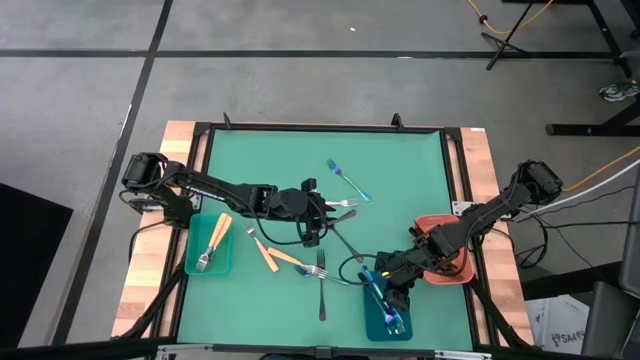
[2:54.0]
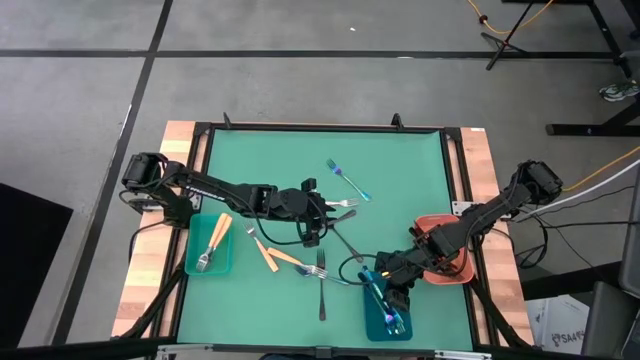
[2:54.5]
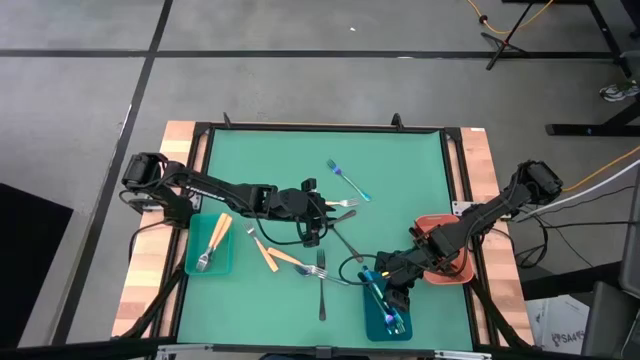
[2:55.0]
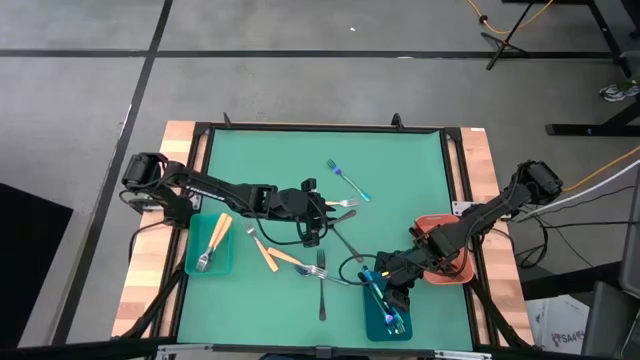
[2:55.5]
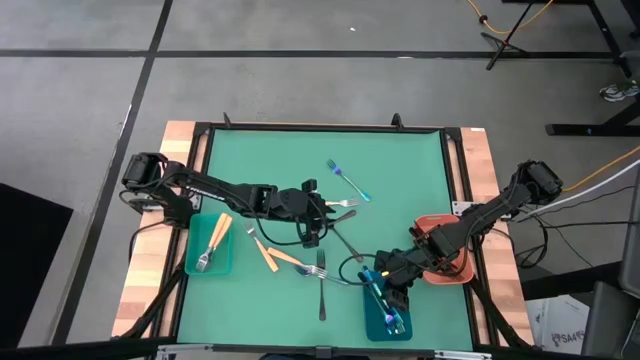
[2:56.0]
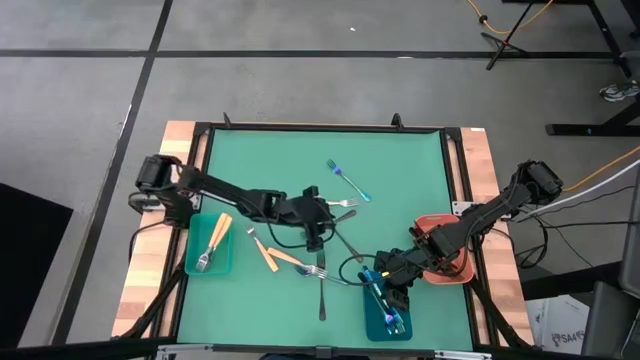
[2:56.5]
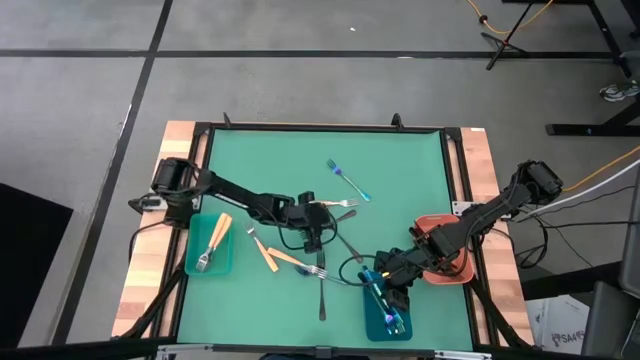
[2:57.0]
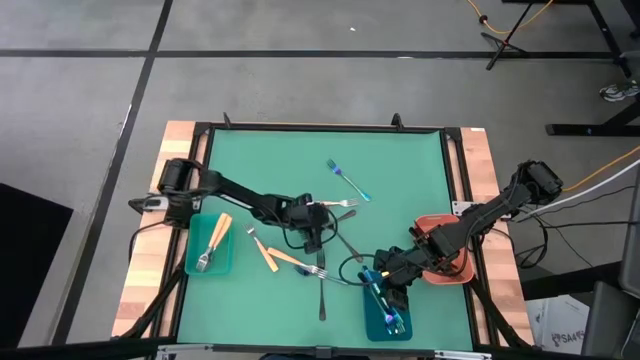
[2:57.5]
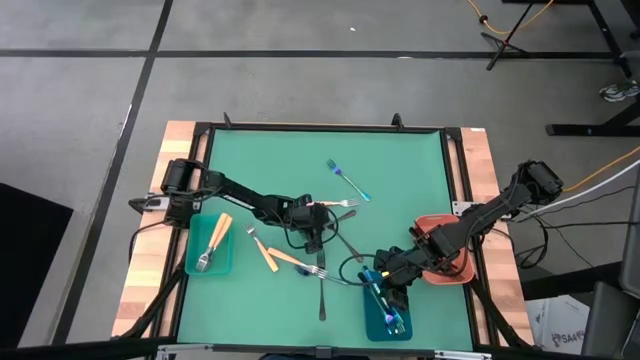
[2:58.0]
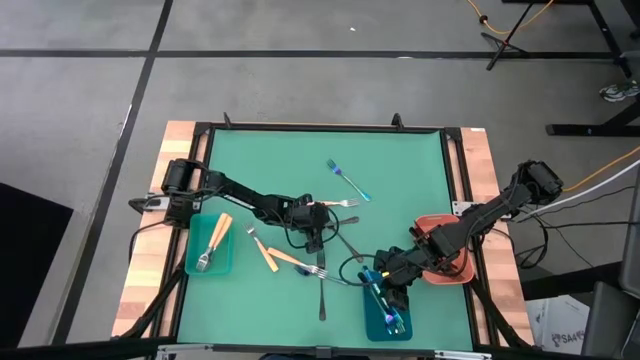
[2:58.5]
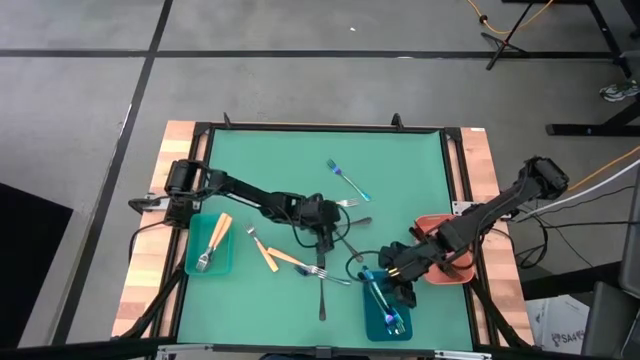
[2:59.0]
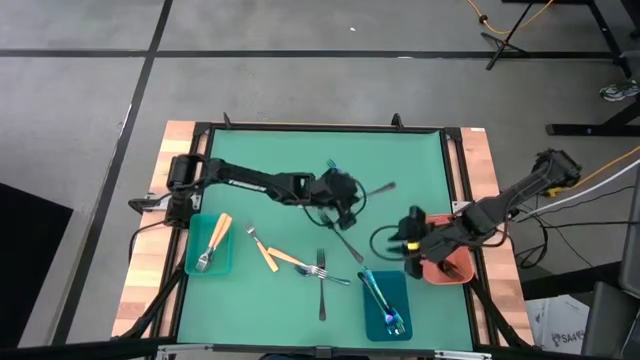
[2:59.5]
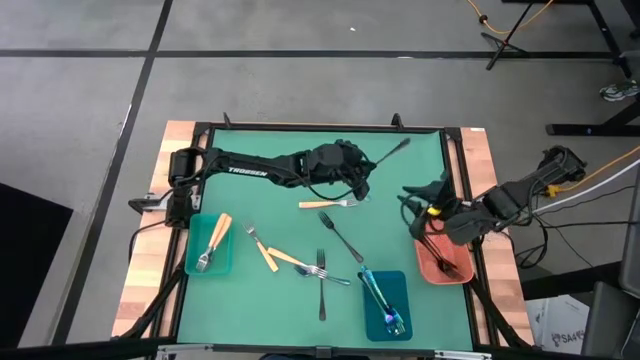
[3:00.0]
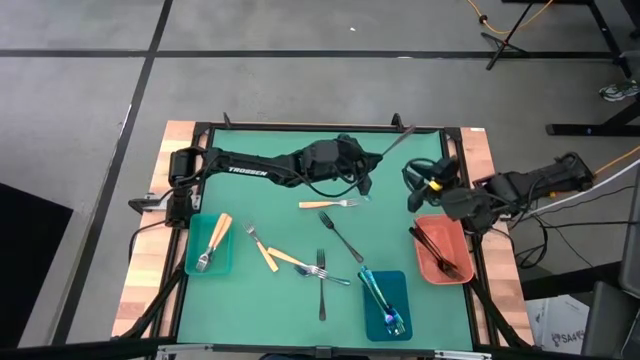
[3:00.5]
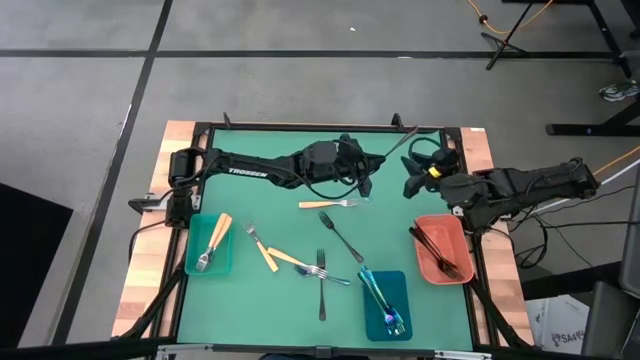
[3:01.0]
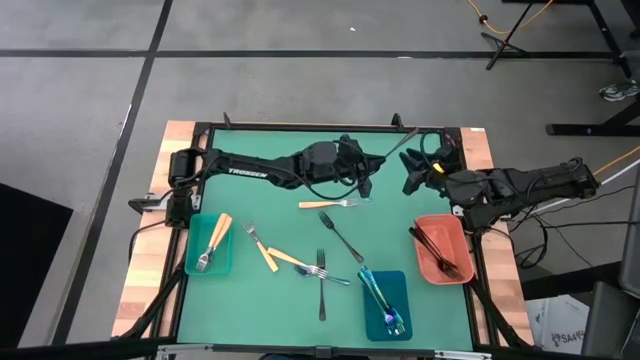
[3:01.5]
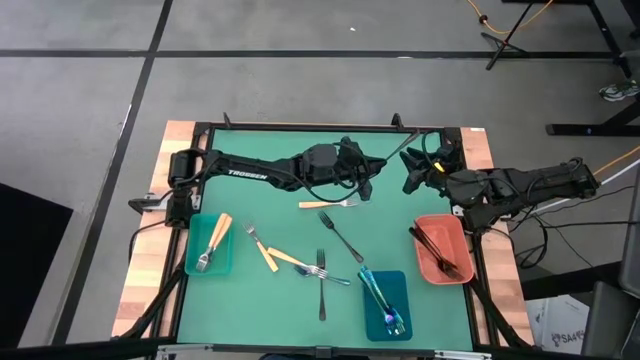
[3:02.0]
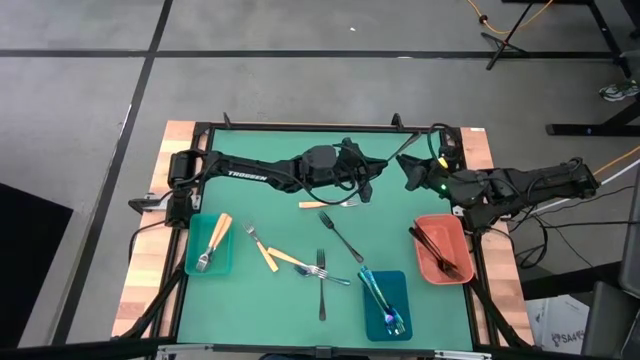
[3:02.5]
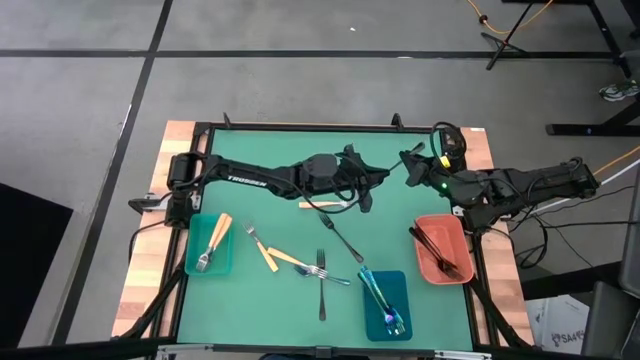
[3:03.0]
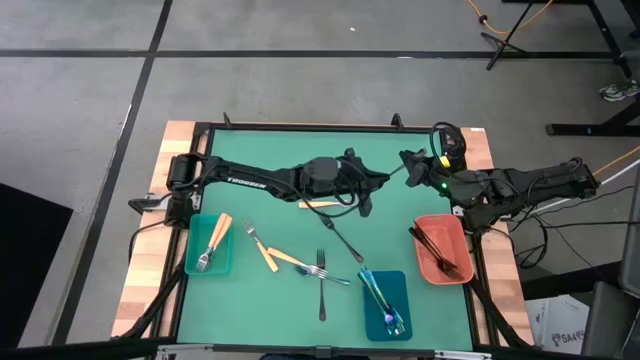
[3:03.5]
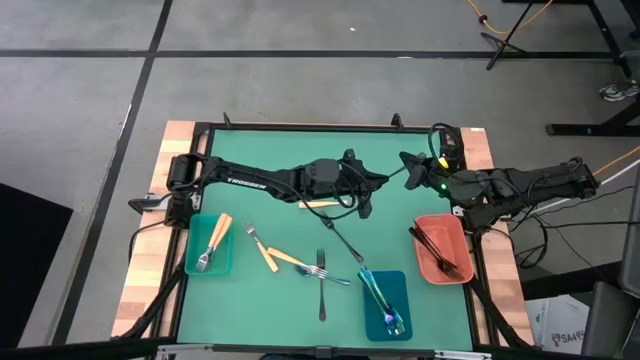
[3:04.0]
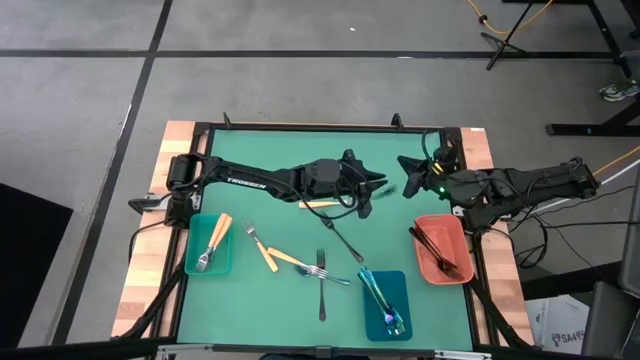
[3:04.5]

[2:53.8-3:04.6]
Task: Sort silverware by color (type)
Put the black fork into the orange bin

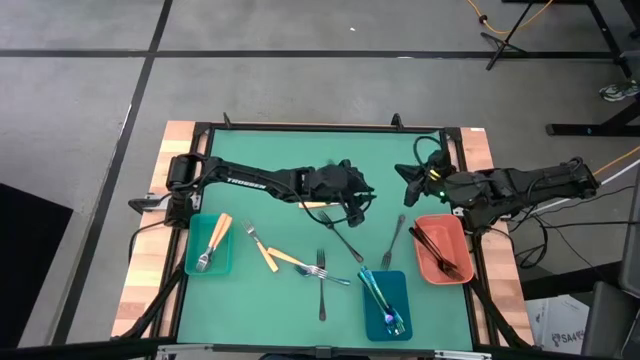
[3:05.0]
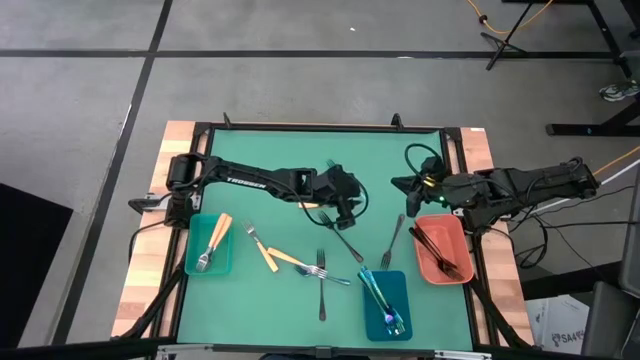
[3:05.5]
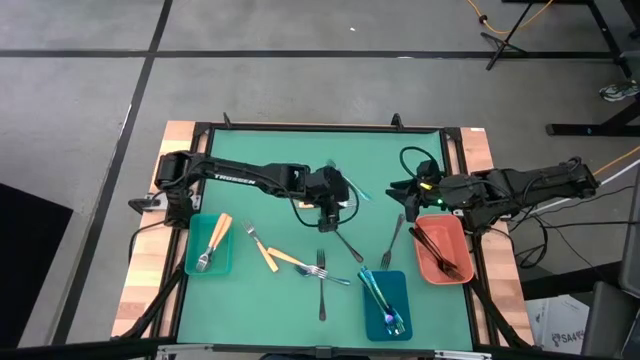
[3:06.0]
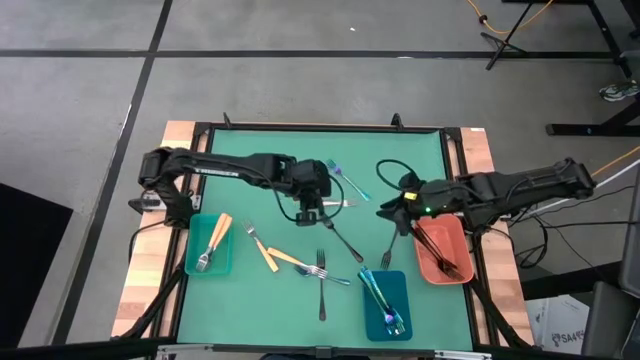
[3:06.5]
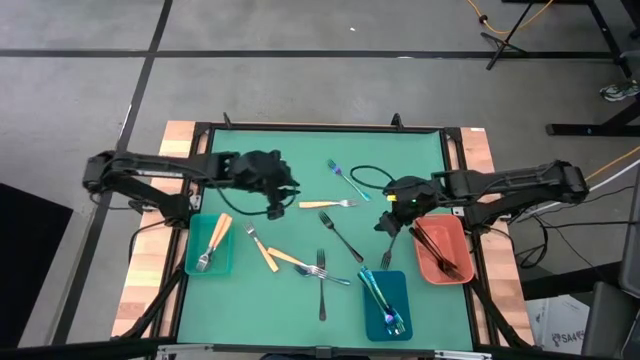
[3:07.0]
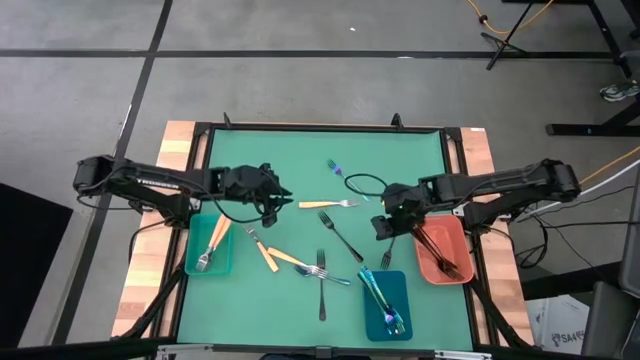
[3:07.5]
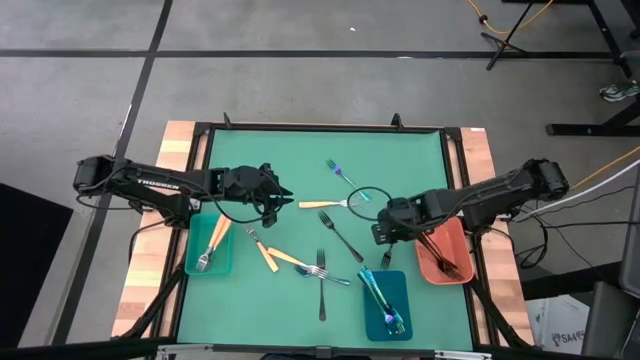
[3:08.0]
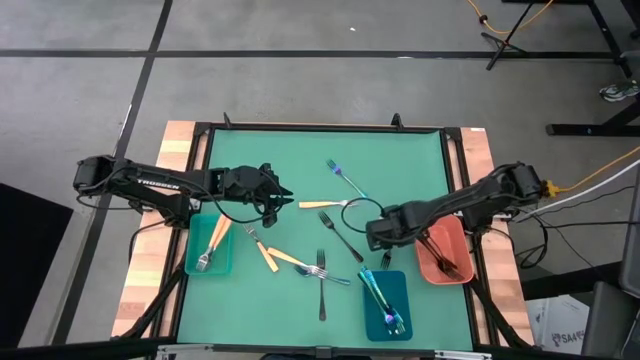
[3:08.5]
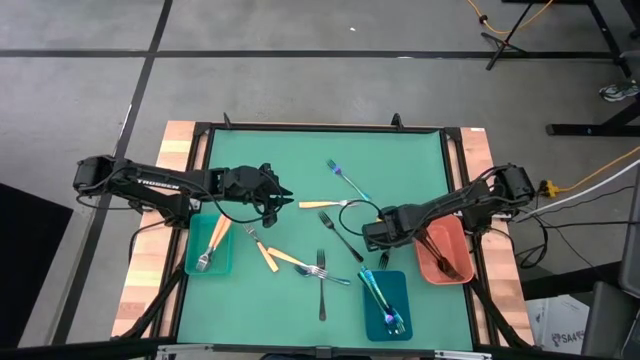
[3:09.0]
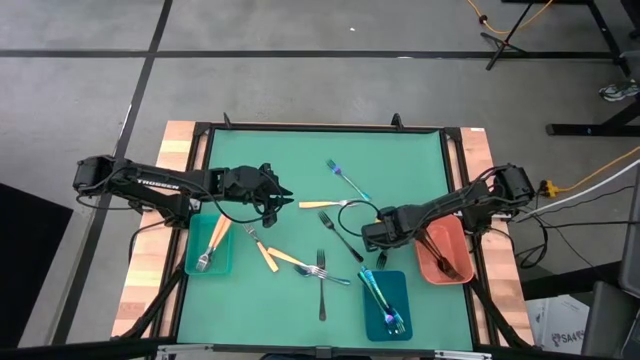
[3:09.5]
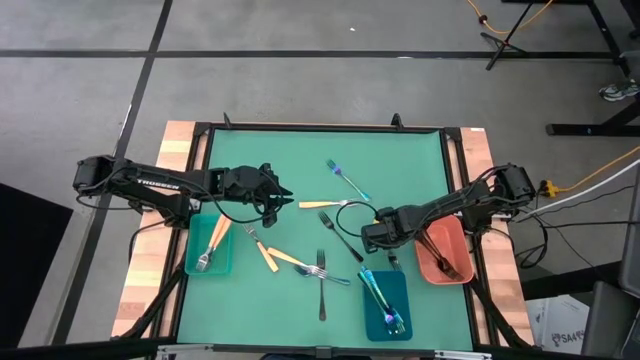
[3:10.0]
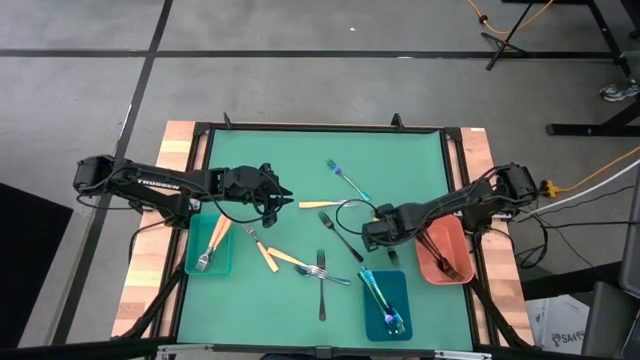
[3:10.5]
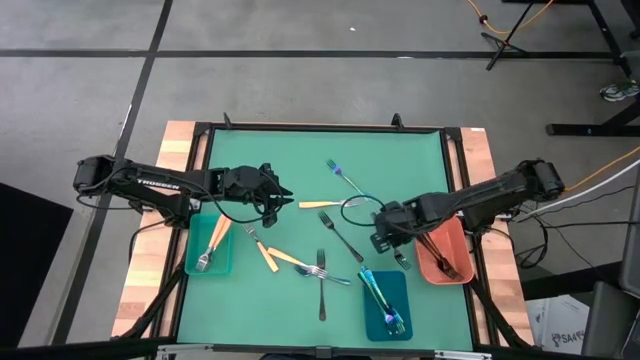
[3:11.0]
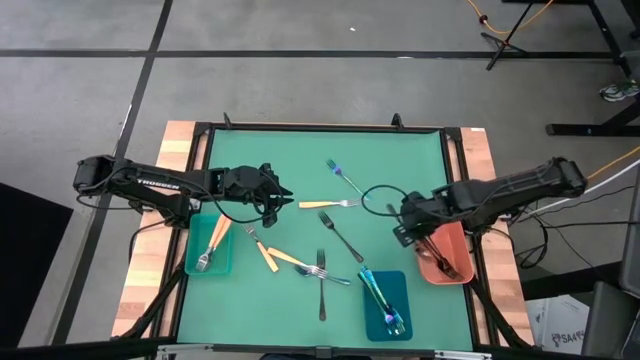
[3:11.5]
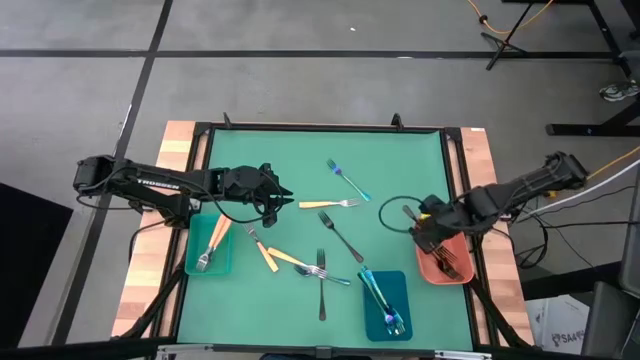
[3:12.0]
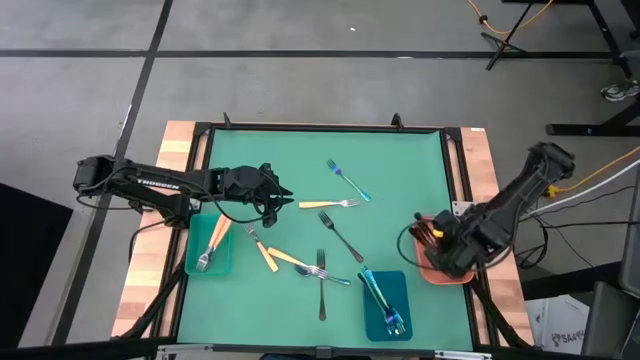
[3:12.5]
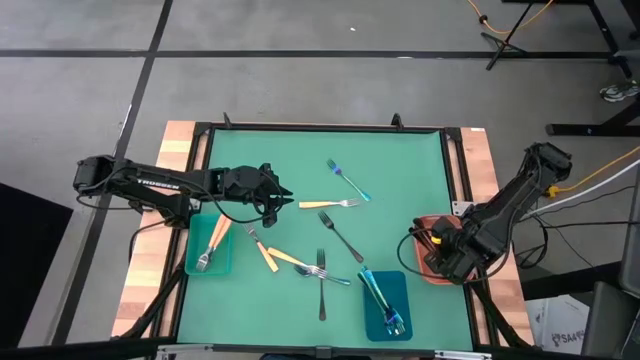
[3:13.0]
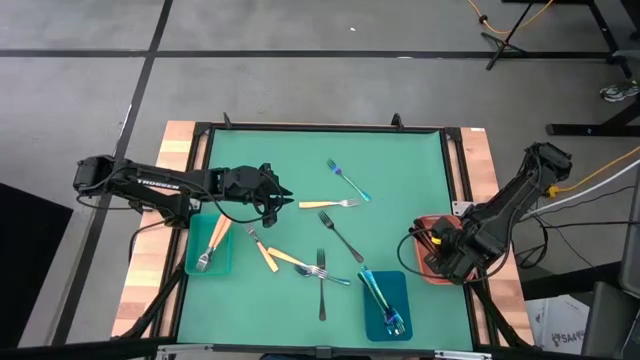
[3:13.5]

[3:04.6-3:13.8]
Put the black fork into the orange bin
